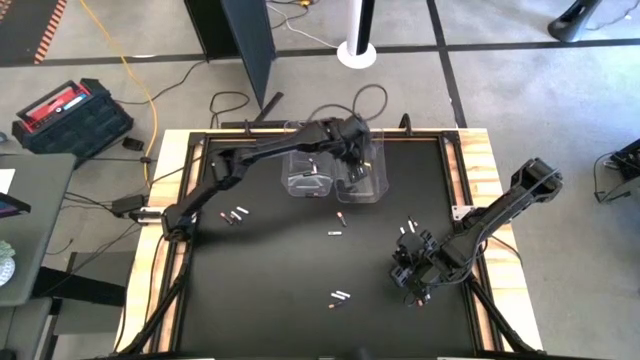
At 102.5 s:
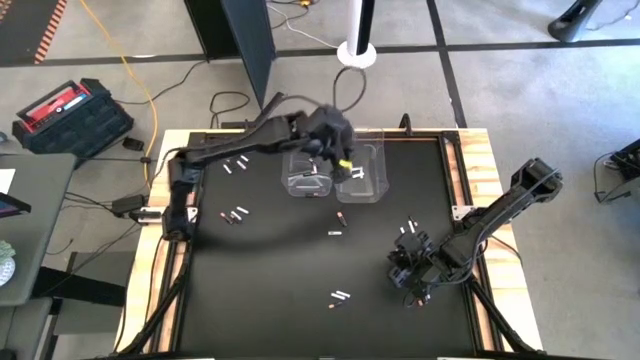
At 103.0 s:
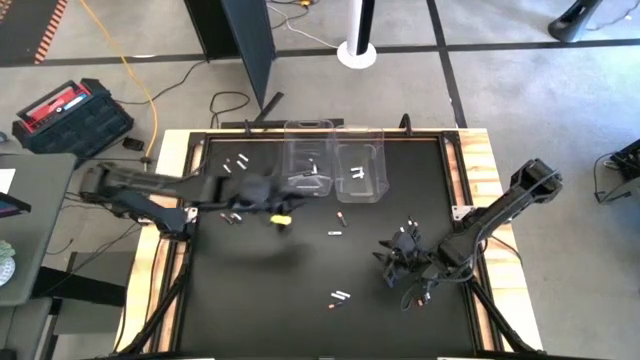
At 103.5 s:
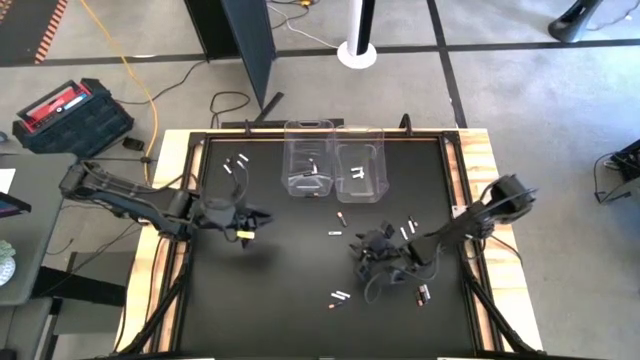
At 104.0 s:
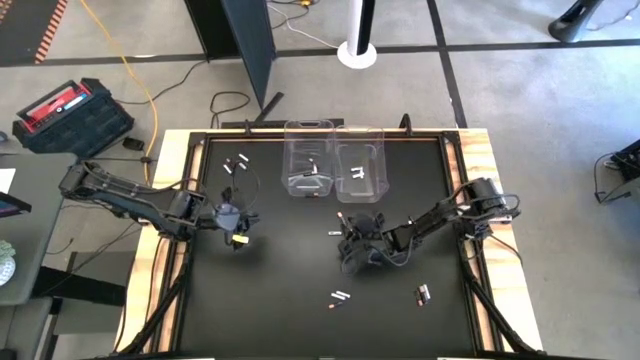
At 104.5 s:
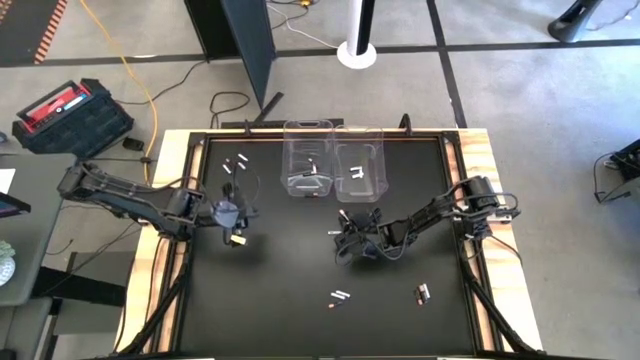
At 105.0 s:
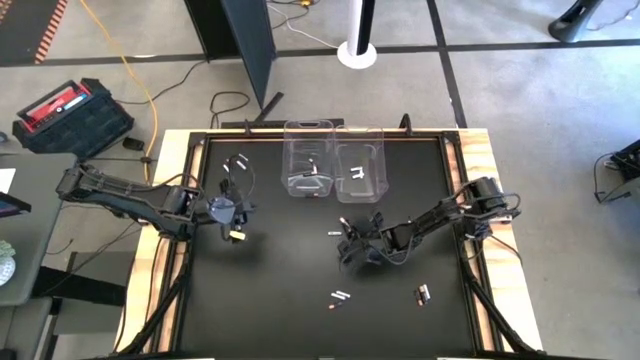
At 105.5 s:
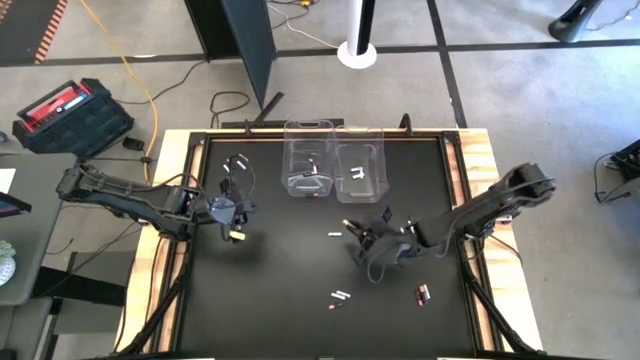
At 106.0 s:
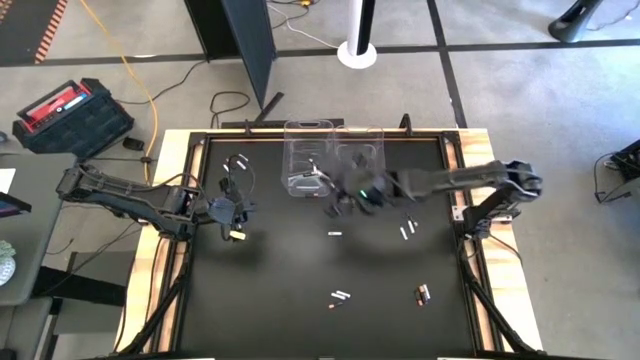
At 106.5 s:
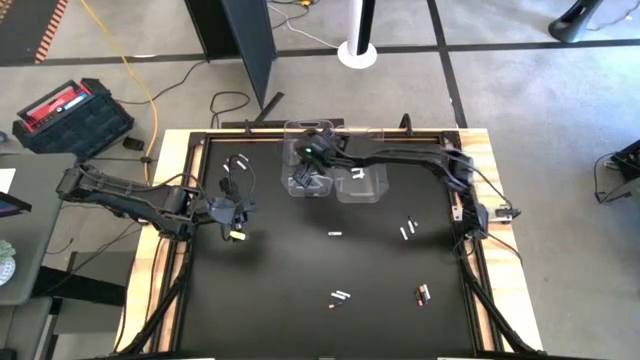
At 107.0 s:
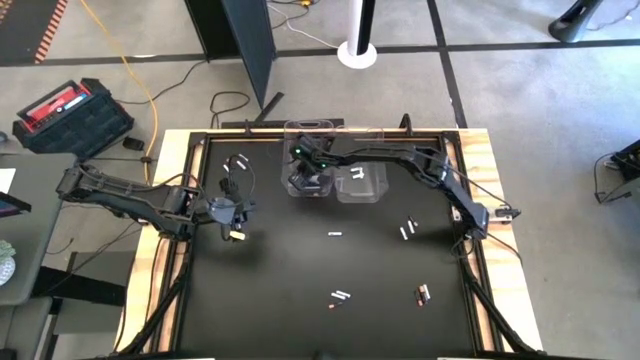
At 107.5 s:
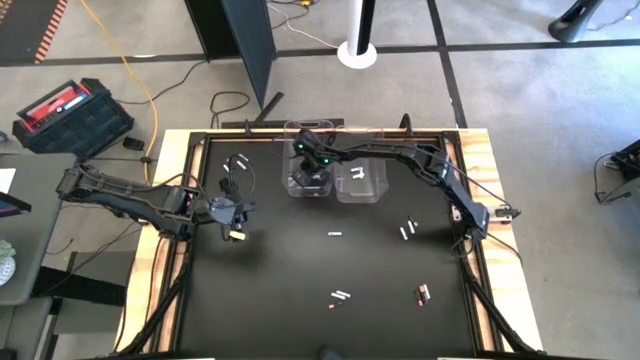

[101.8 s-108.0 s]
Task: Sort batteries
Put the black battery into the left transparent bin

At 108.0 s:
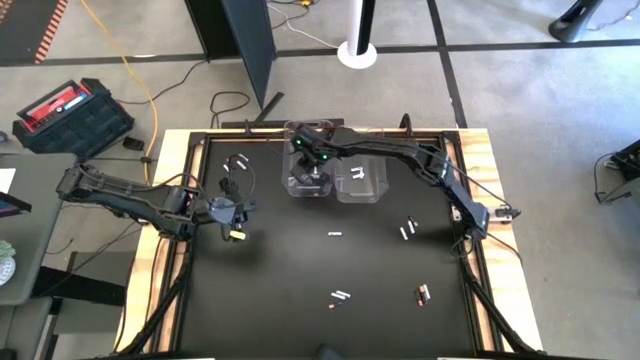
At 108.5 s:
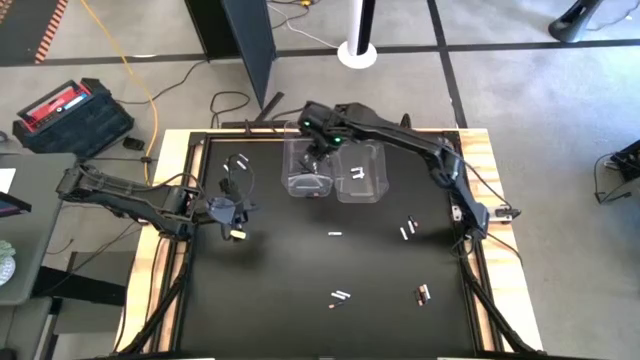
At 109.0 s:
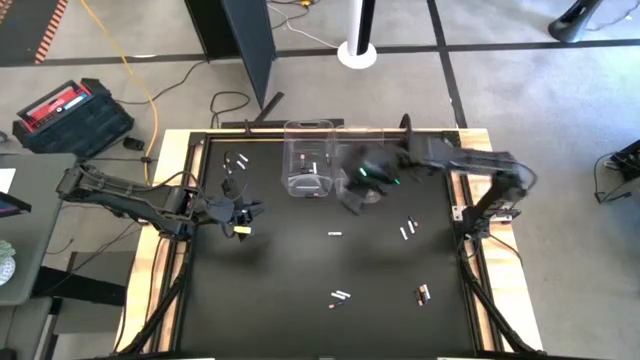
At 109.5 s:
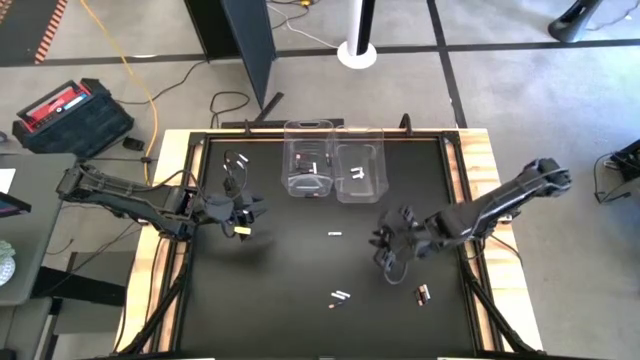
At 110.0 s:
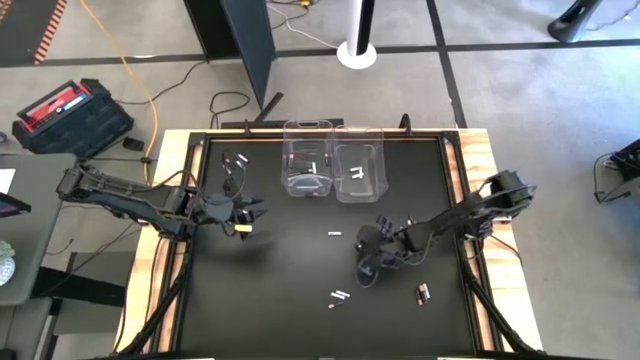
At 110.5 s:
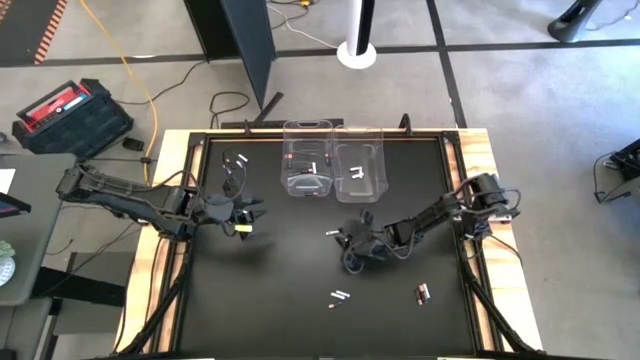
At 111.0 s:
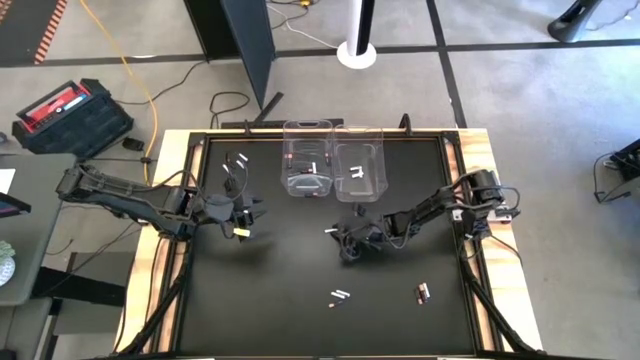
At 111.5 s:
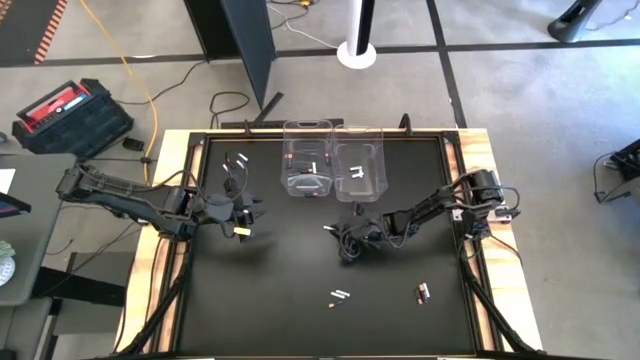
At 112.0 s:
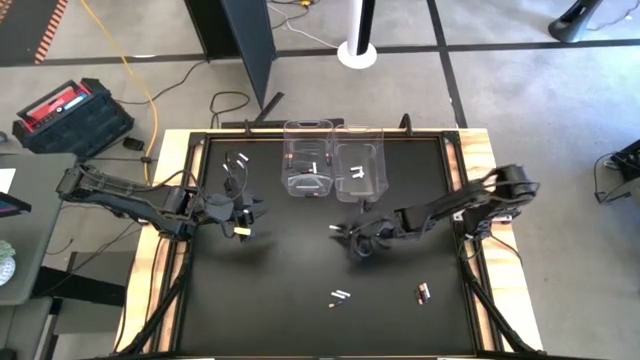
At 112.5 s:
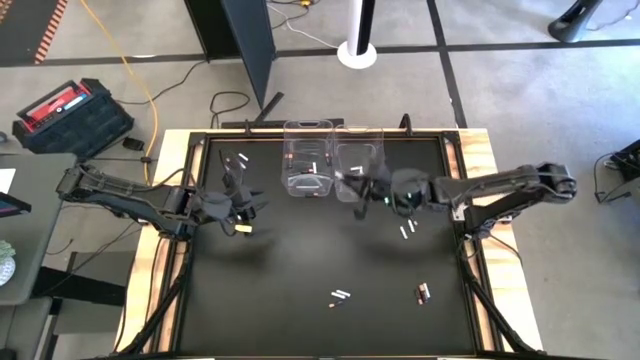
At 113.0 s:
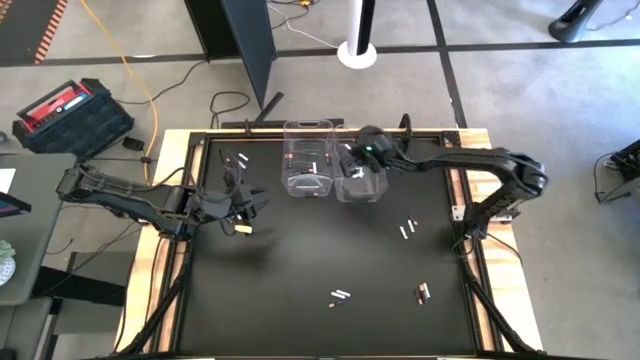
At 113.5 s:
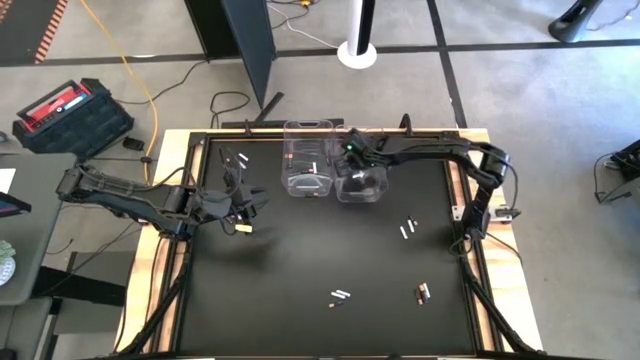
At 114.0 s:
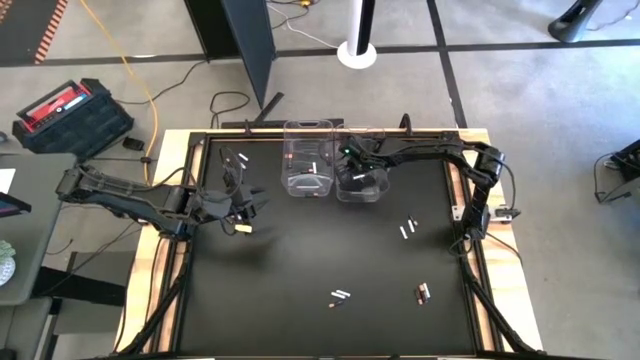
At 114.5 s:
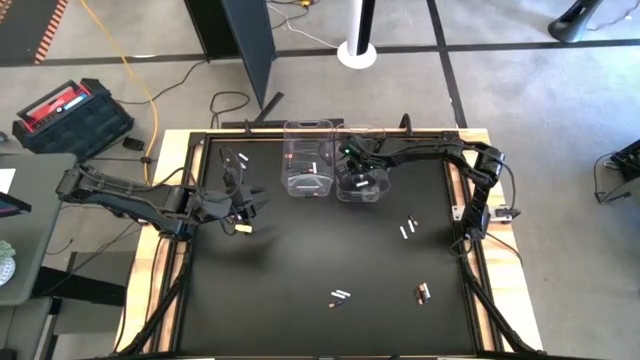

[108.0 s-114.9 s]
Put the white battery into the right transparent bin

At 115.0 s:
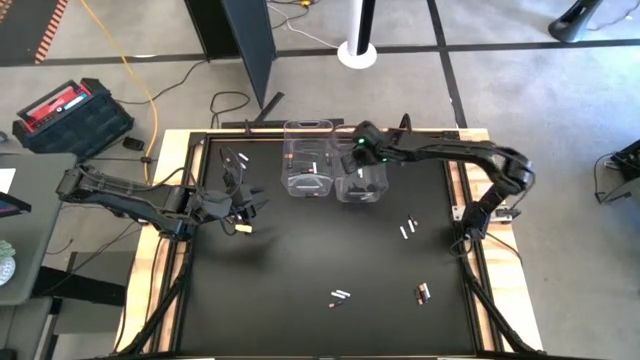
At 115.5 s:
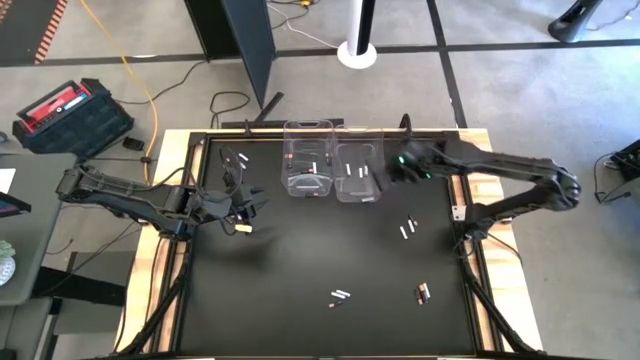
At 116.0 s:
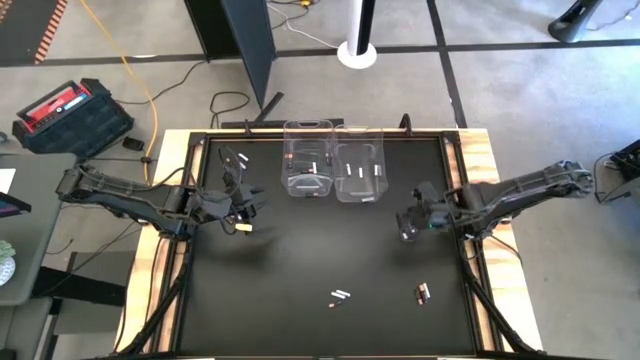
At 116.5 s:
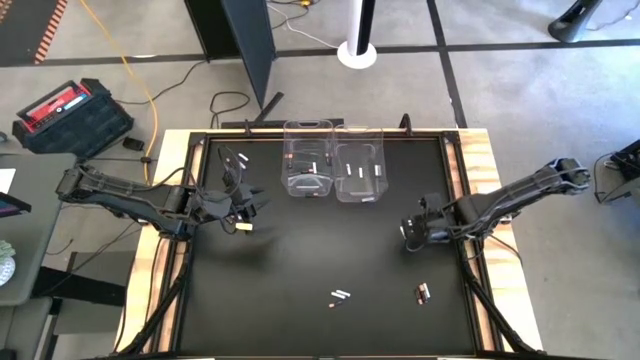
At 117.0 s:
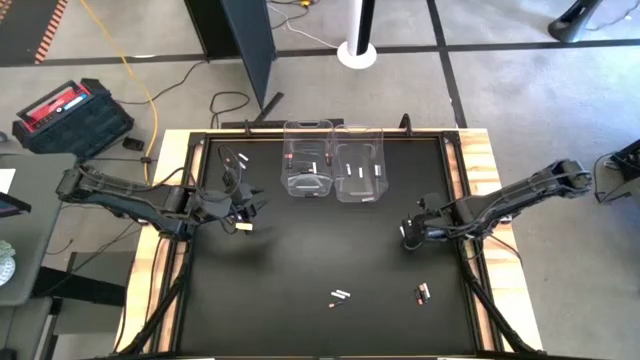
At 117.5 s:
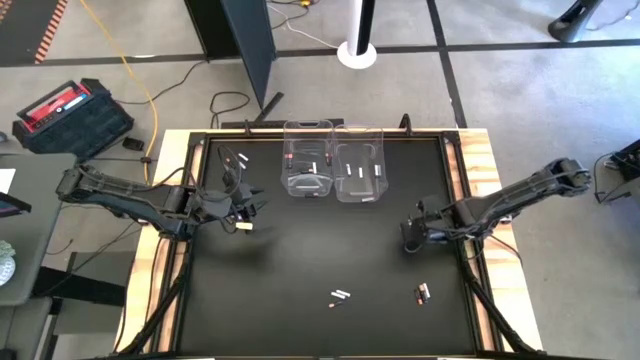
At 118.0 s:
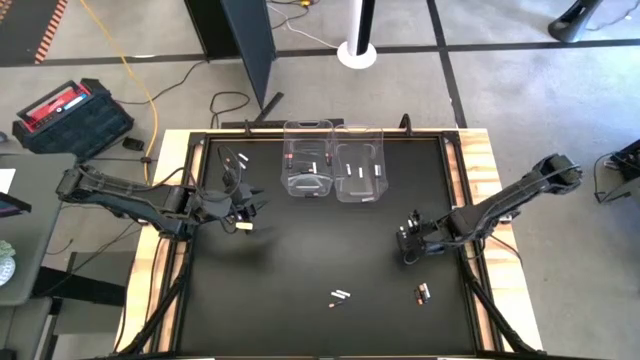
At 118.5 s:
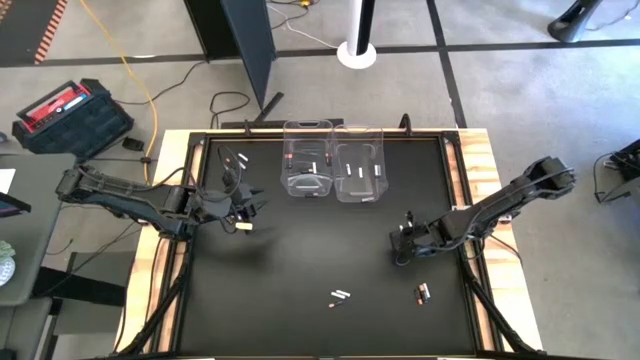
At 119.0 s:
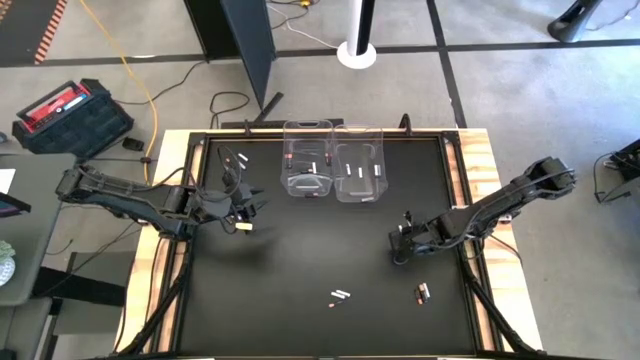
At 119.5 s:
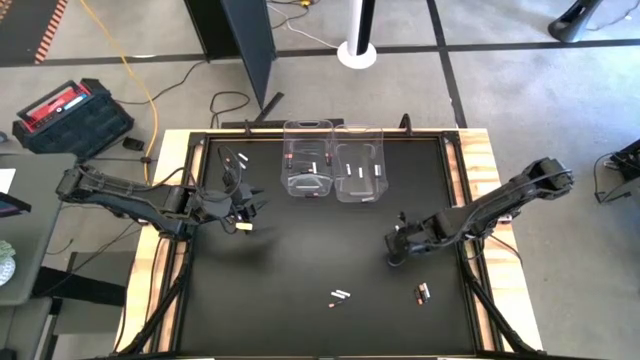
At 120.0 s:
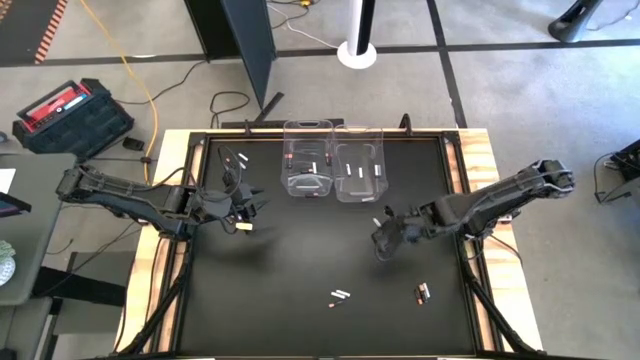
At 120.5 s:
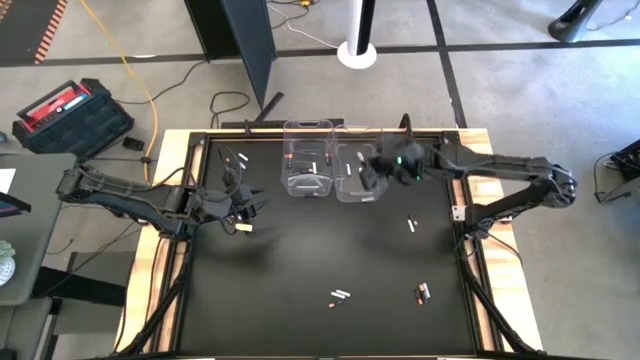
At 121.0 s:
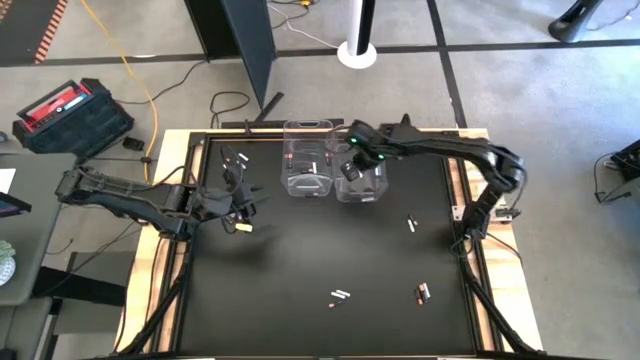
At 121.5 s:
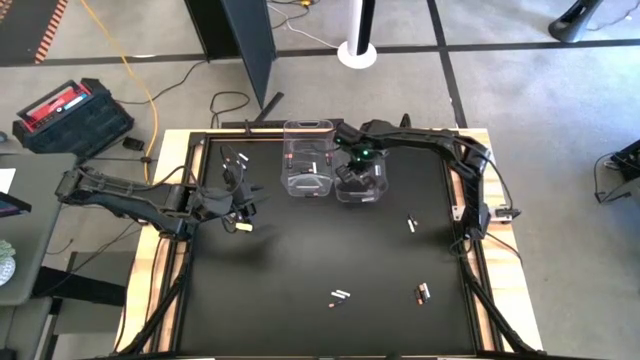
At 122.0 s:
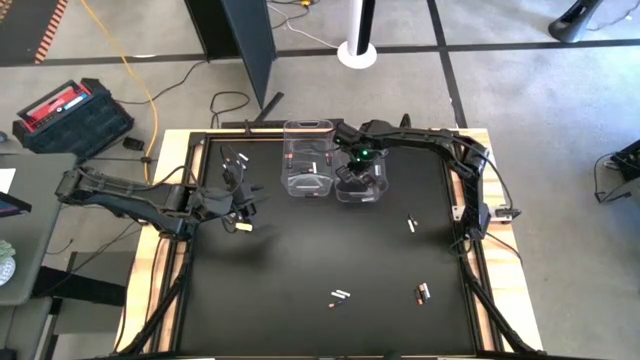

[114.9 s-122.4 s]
Put the white battery into the right transparent bin

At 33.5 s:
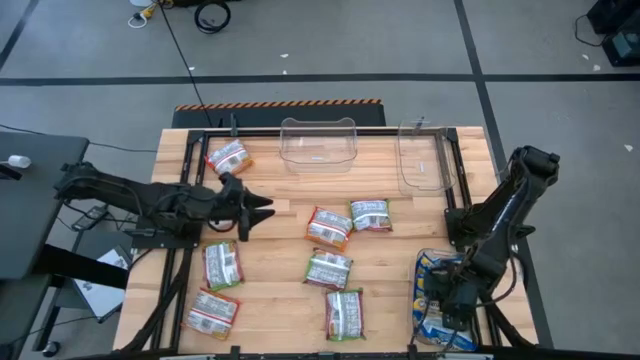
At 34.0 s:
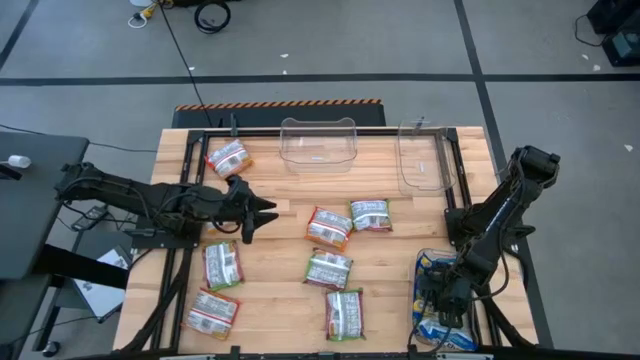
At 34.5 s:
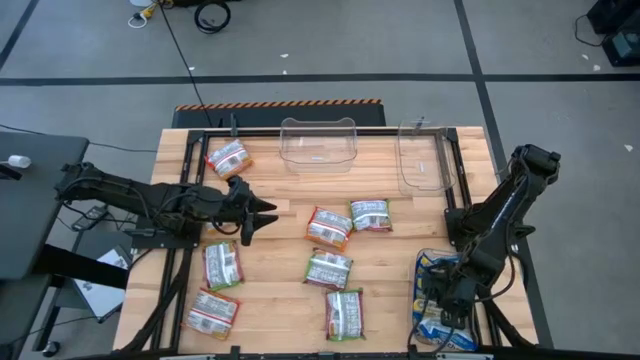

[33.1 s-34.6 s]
Task: Sort Maruchan noodles
Adjust the blue noodle pack

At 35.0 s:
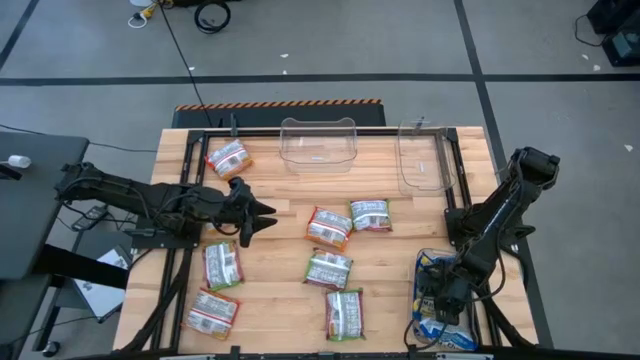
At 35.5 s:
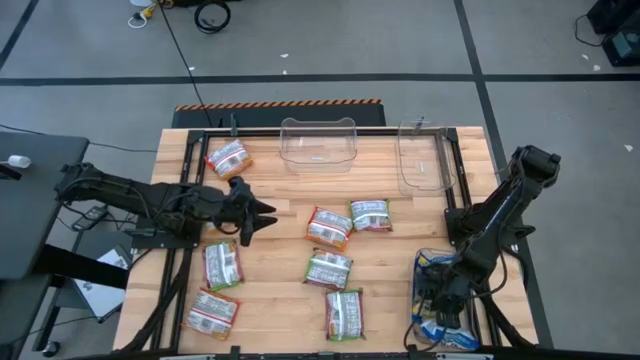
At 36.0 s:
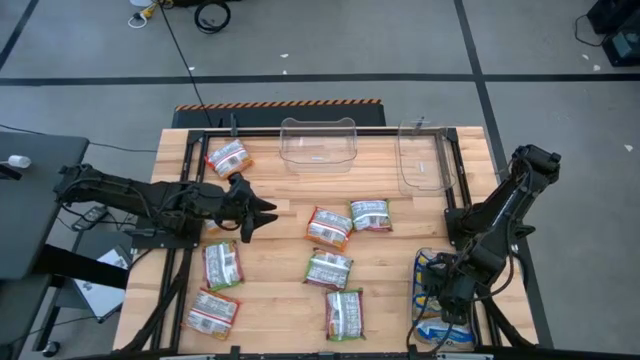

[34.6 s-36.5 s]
Adjust the blue noodle pack
